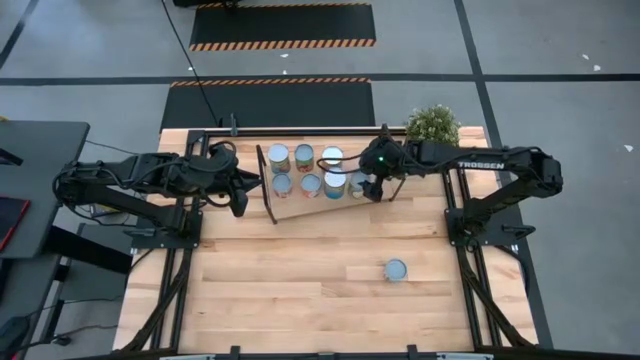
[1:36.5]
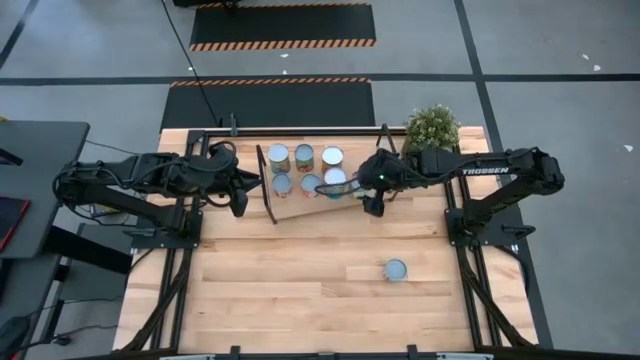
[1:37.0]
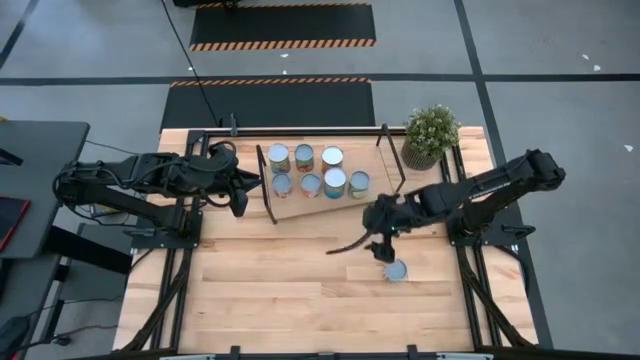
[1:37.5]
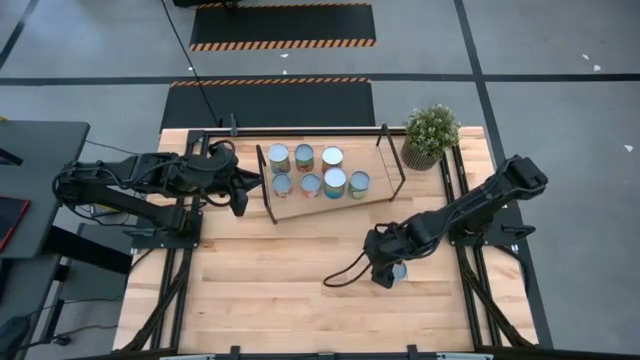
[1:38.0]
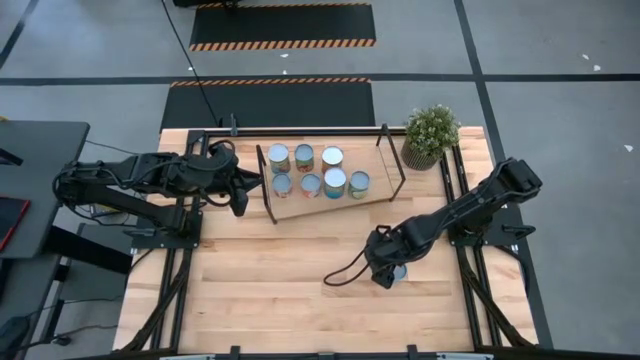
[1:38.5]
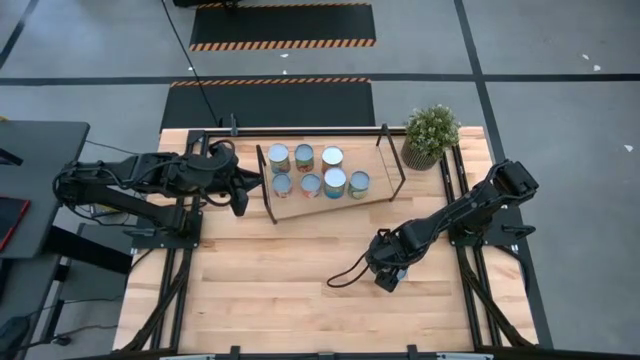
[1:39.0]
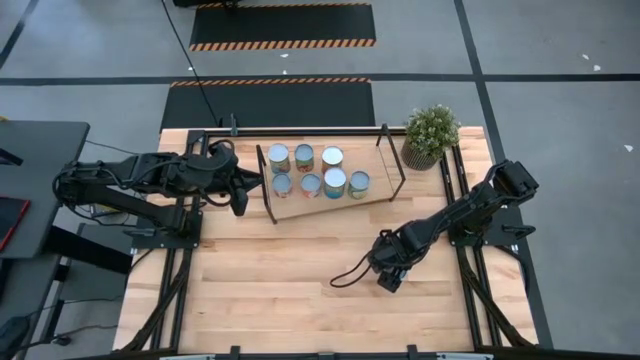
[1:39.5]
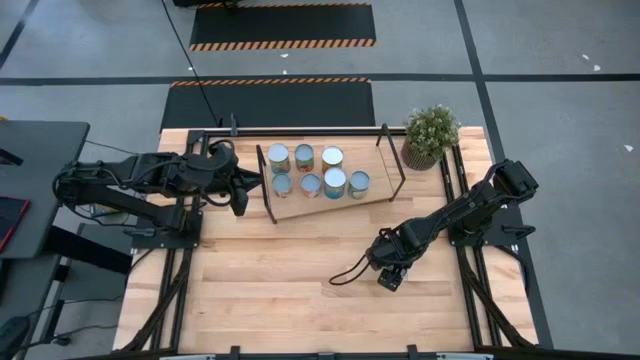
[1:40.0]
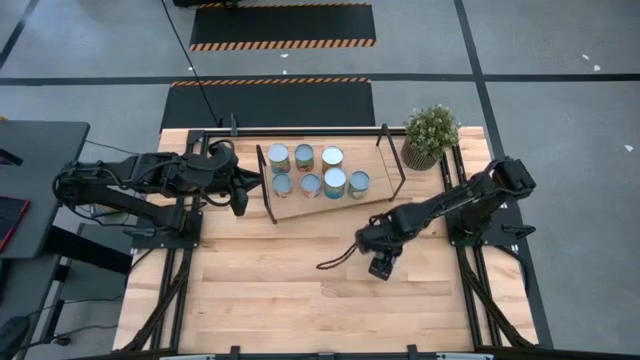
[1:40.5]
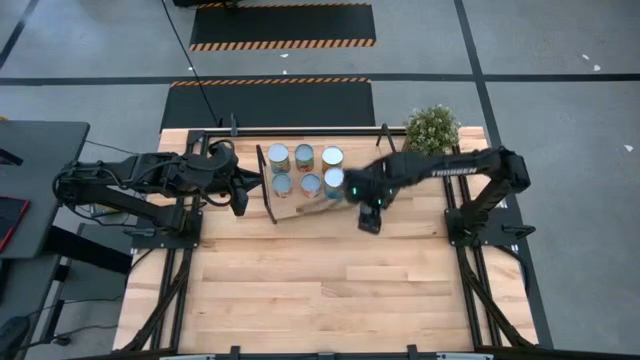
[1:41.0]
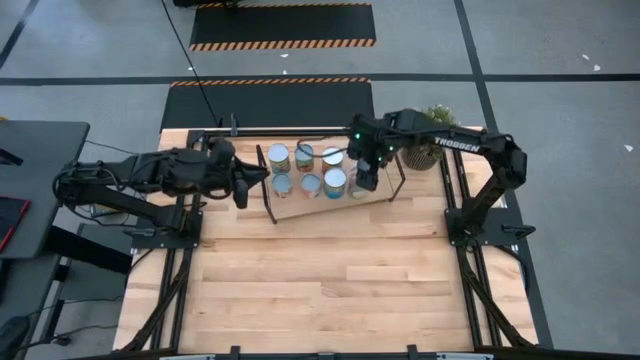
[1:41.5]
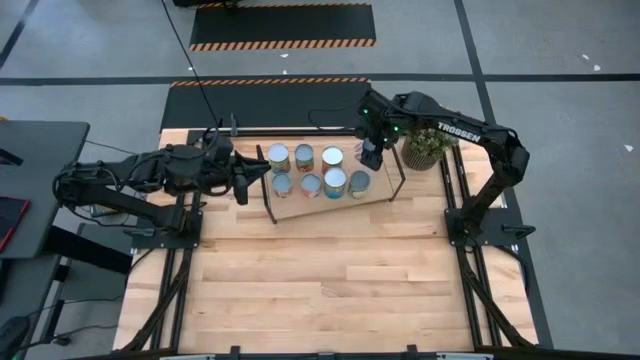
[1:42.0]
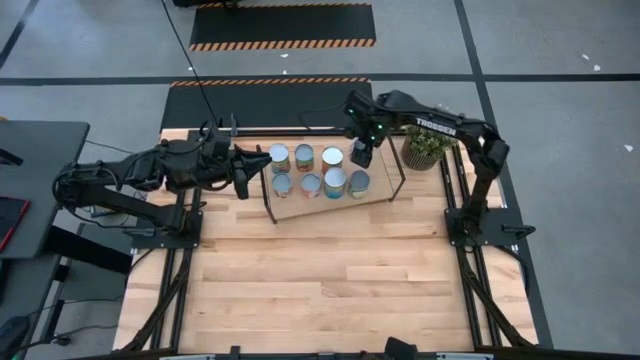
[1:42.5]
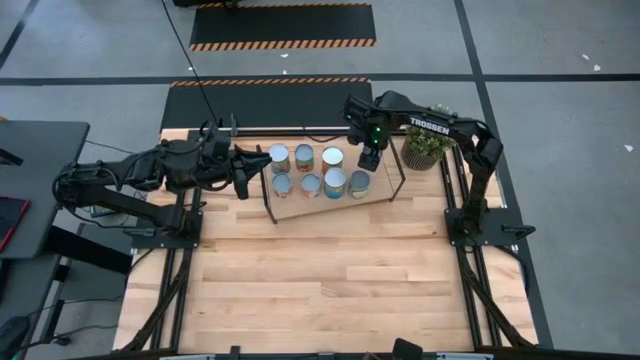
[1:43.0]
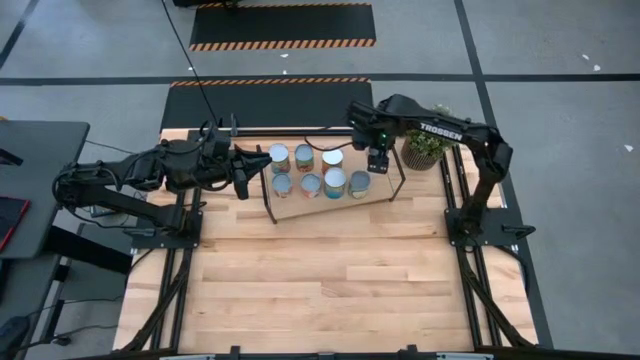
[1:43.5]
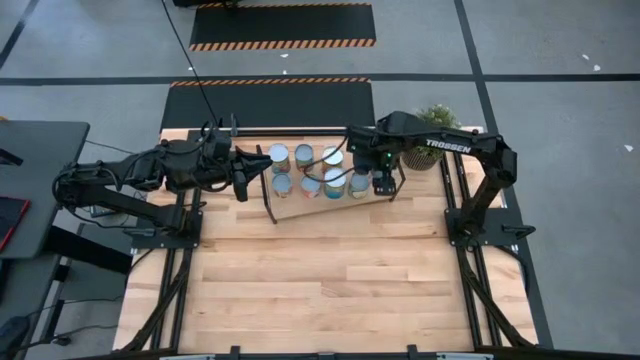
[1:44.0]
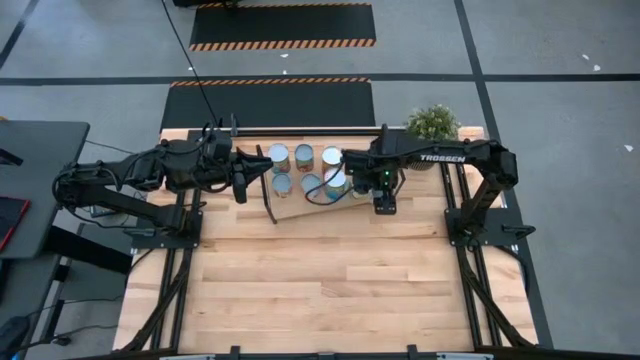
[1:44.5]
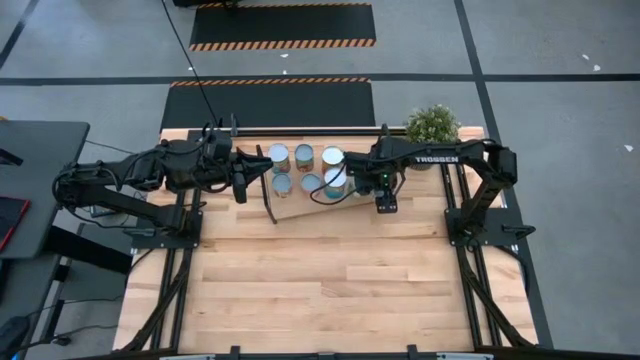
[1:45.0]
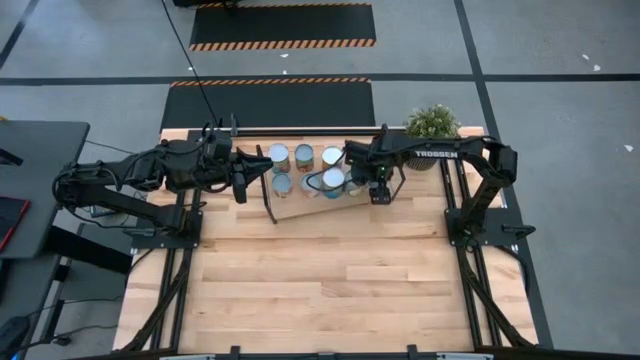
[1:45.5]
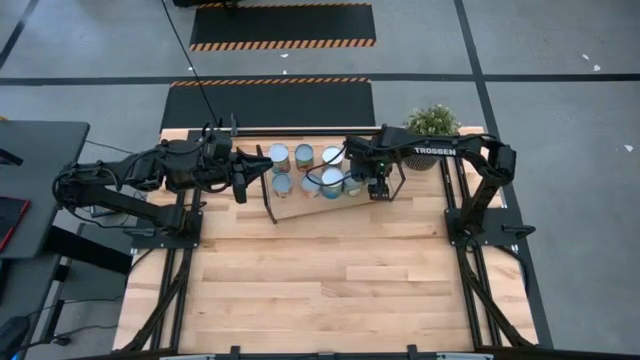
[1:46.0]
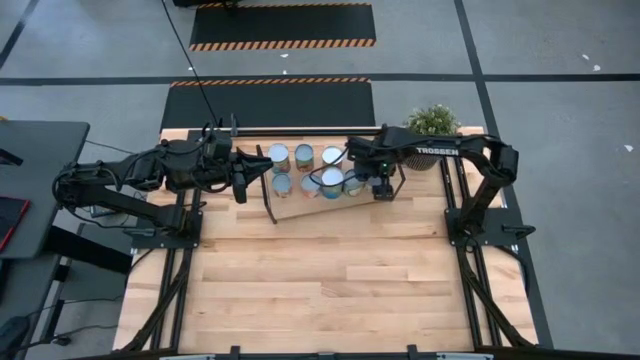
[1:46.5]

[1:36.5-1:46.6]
Task: Pick and place cans onto a shelf
Put the canned carrots on the shelf

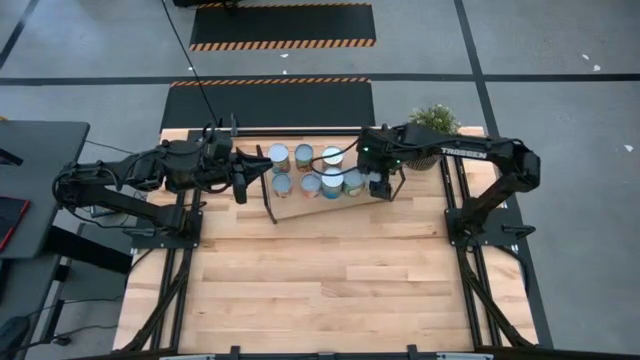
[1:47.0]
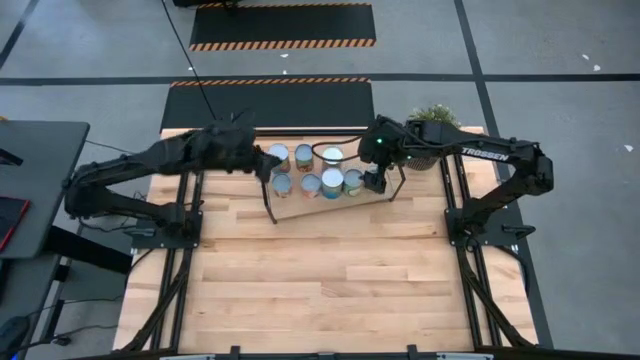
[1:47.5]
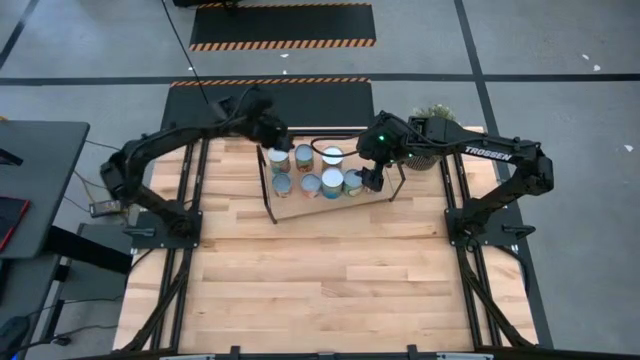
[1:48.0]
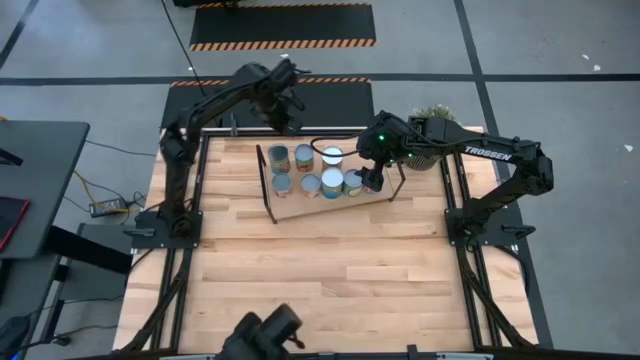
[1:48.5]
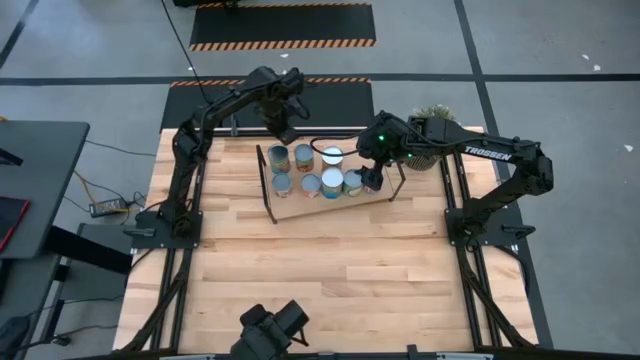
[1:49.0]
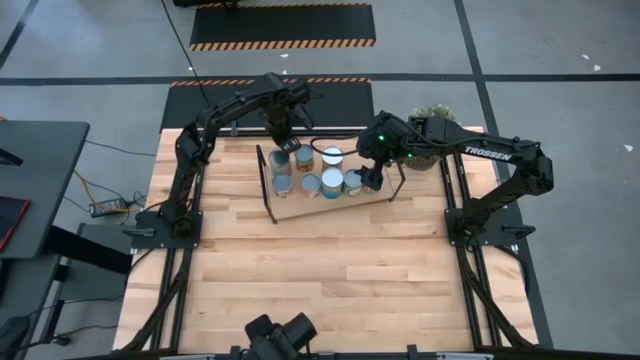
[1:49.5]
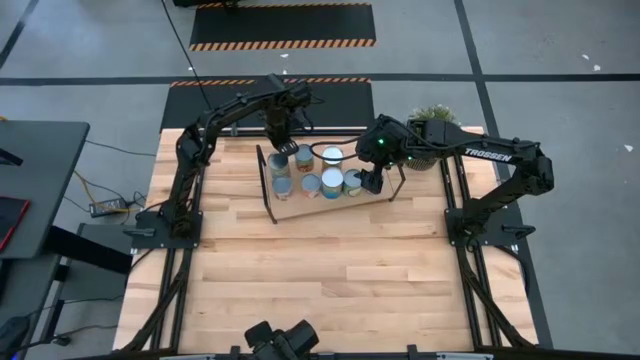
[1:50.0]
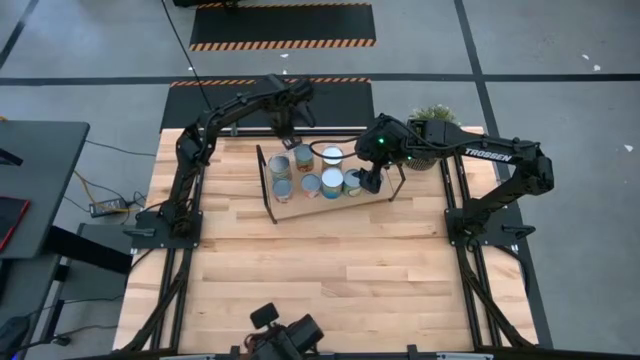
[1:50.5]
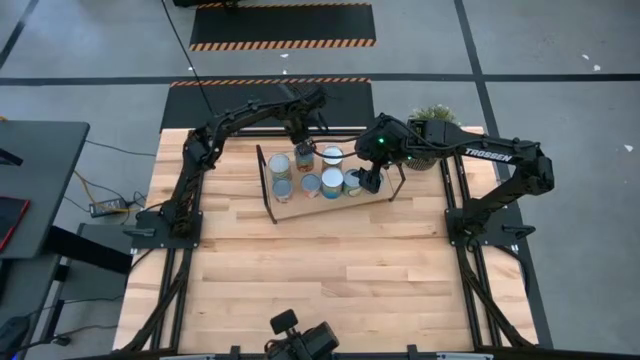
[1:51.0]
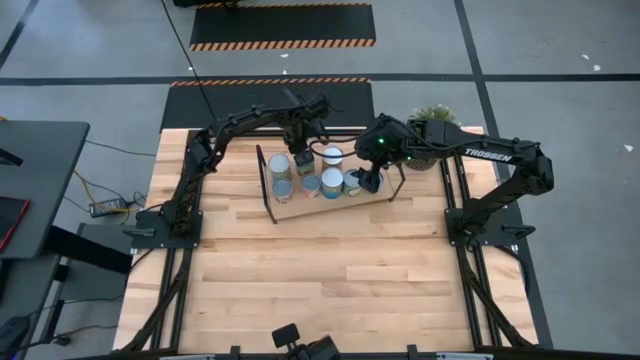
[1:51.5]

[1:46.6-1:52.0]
Adjust the canned goods on the shelf

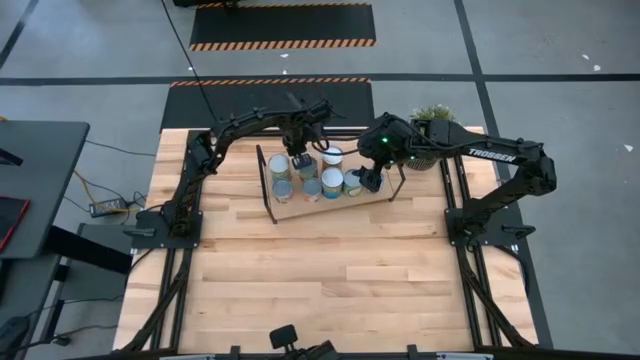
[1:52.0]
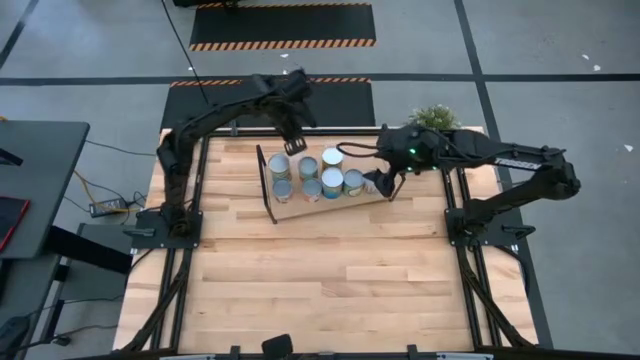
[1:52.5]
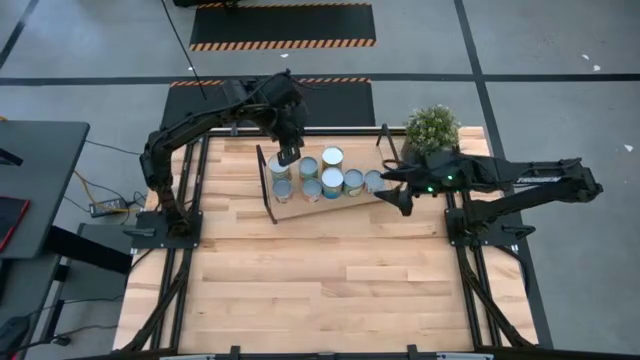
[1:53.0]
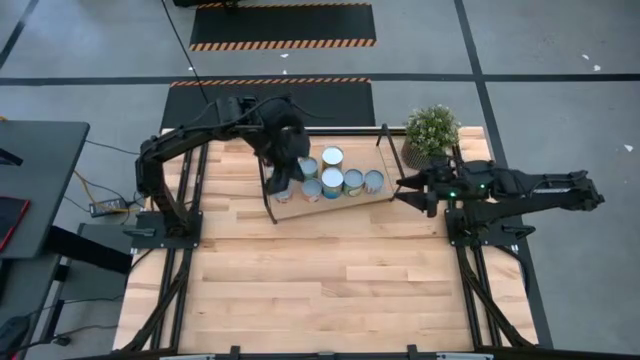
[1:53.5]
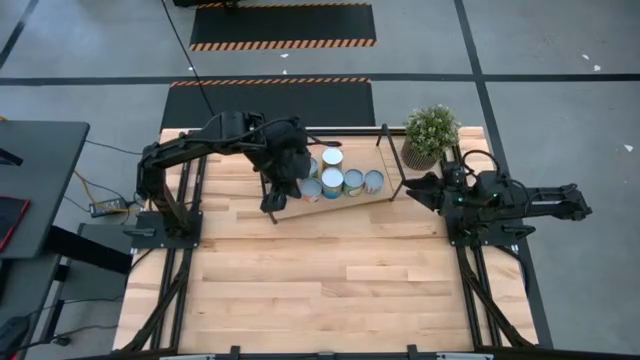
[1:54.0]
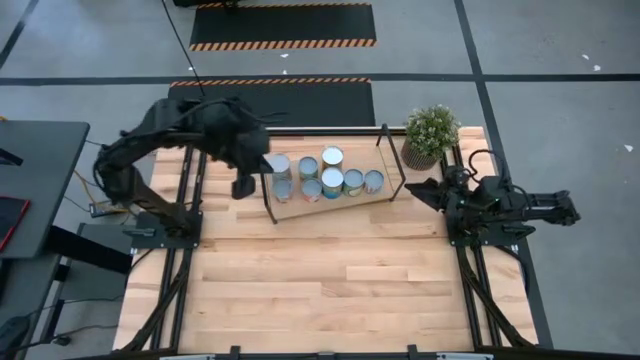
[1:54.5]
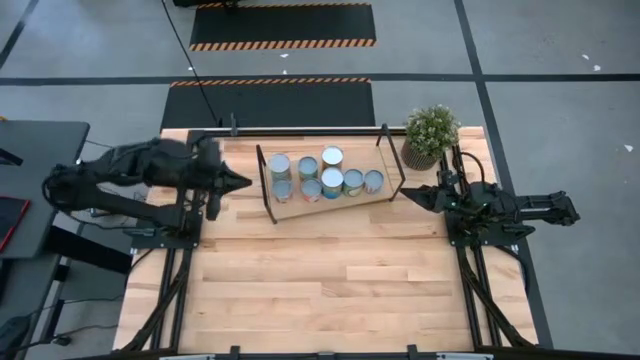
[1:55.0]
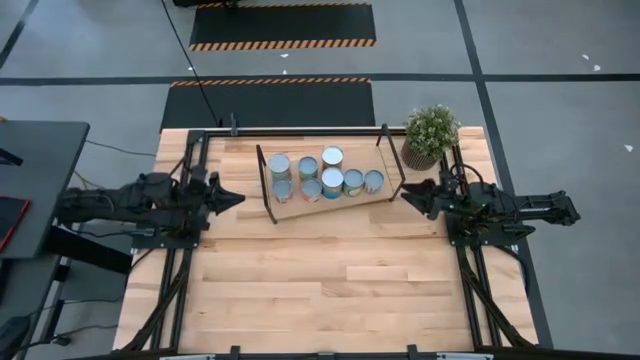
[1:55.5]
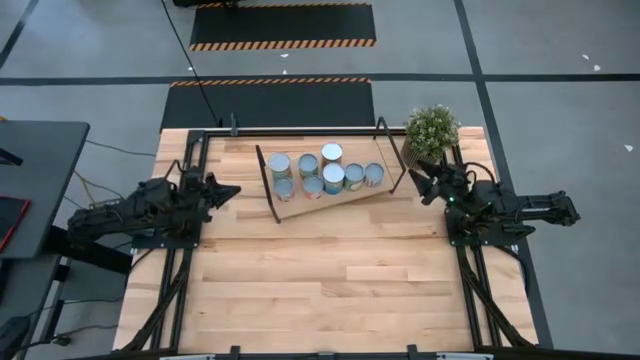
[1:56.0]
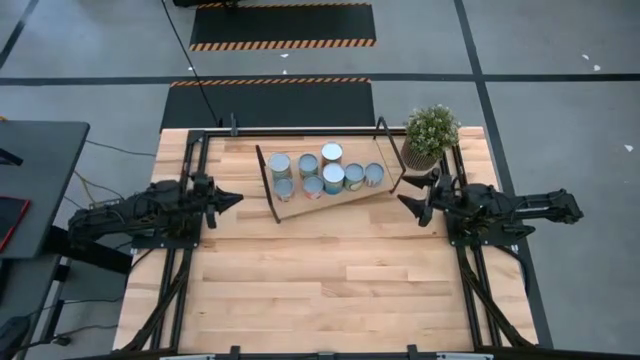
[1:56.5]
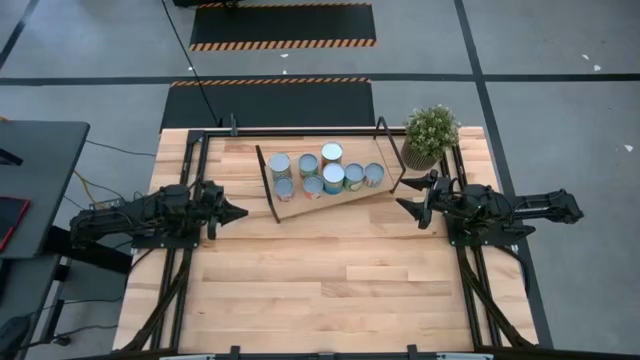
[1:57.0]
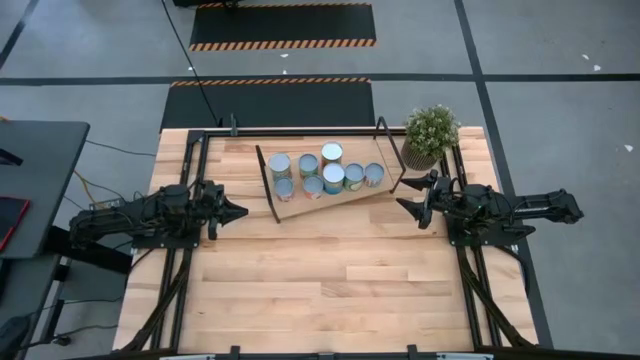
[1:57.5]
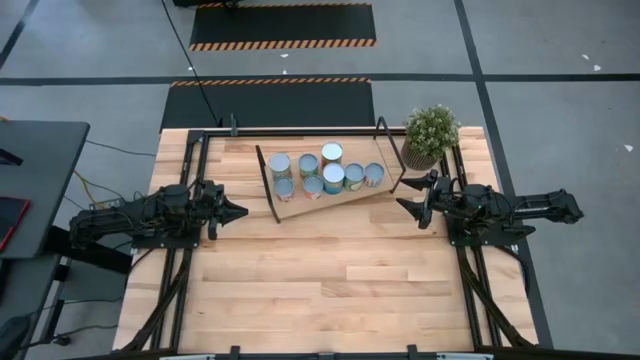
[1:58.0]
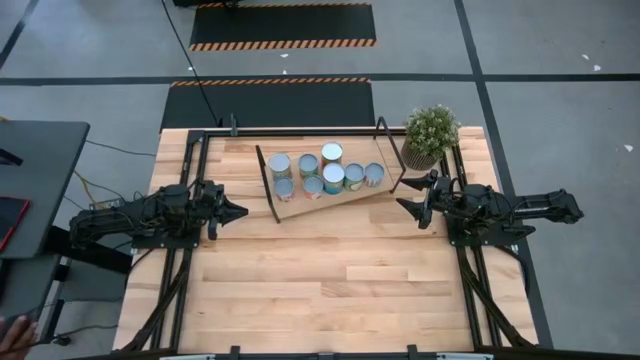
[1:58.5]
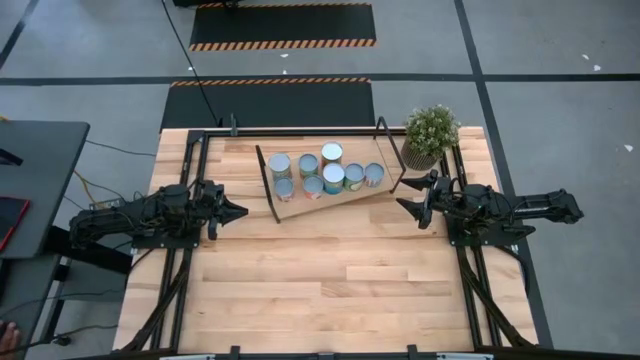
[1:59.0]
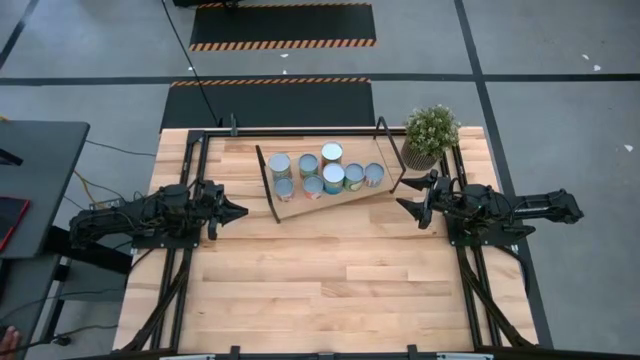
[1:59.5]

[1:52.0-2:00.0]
Return to Home Position
